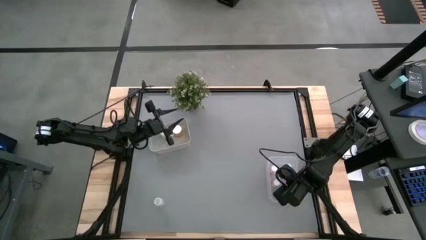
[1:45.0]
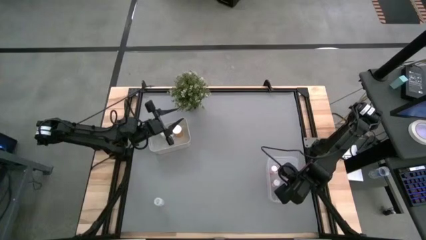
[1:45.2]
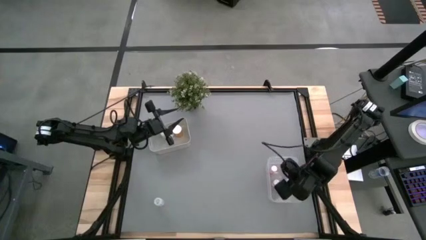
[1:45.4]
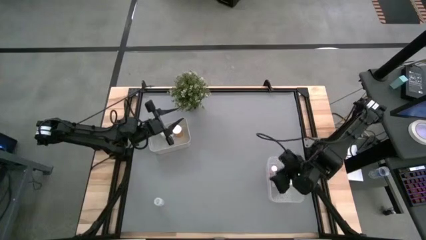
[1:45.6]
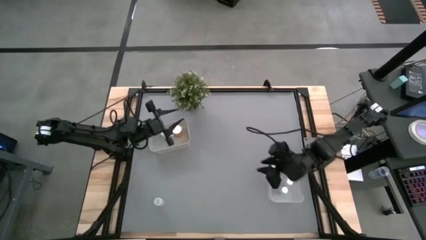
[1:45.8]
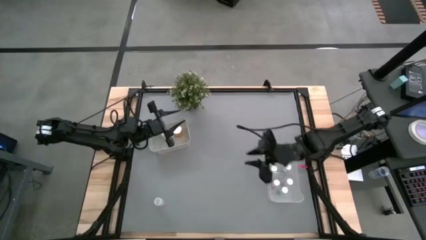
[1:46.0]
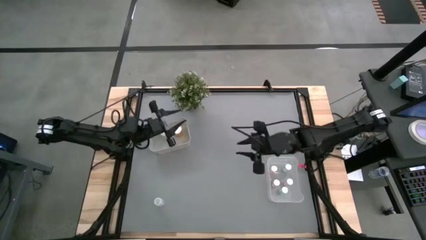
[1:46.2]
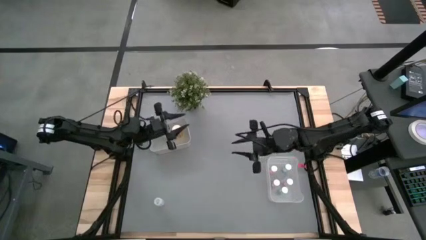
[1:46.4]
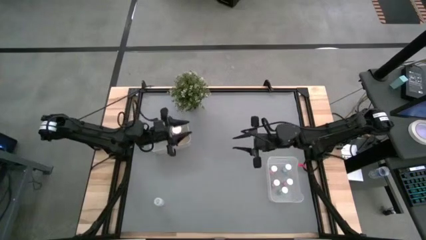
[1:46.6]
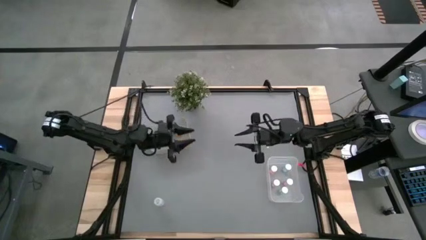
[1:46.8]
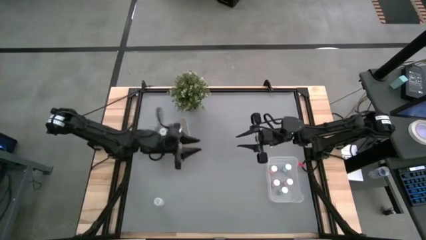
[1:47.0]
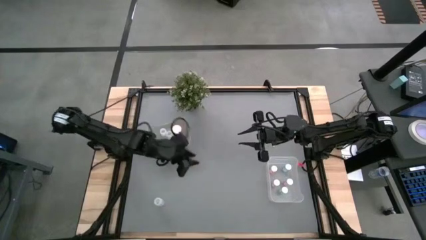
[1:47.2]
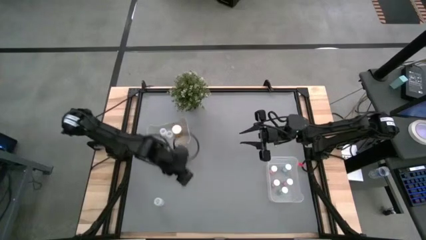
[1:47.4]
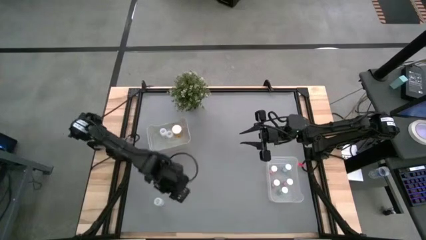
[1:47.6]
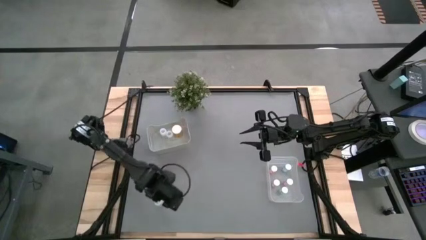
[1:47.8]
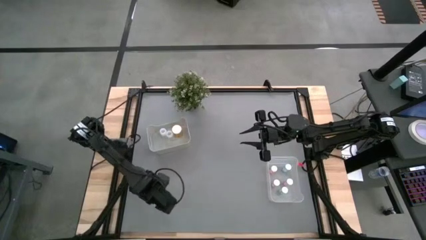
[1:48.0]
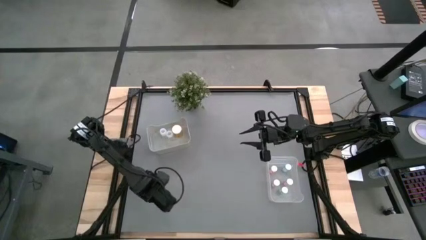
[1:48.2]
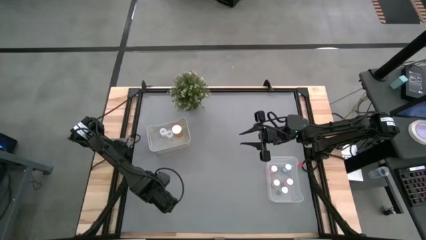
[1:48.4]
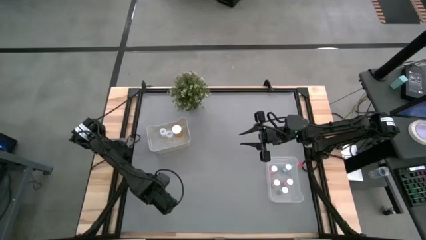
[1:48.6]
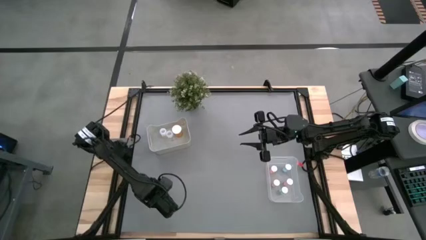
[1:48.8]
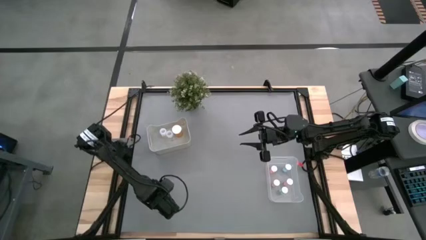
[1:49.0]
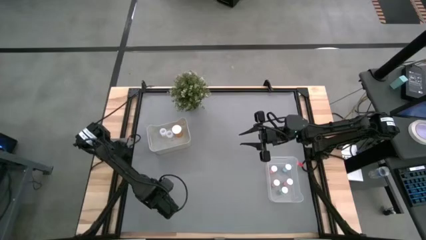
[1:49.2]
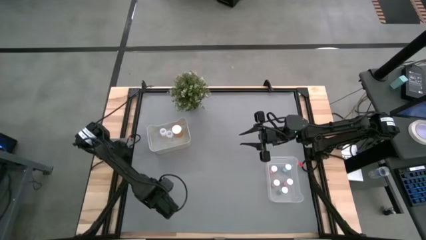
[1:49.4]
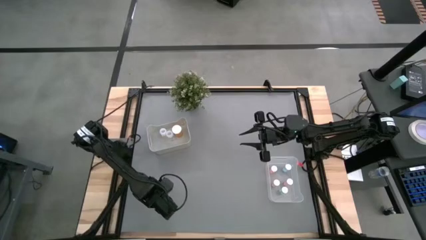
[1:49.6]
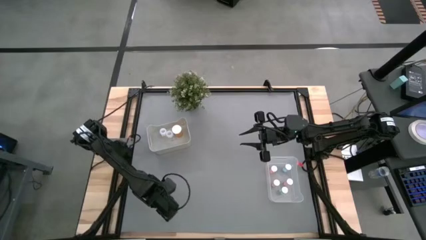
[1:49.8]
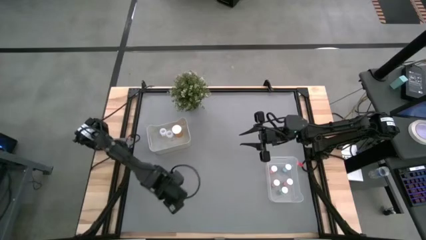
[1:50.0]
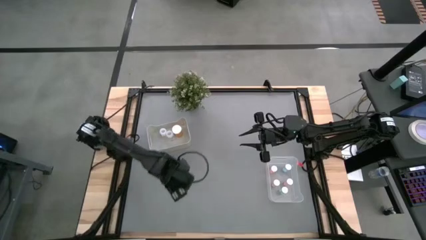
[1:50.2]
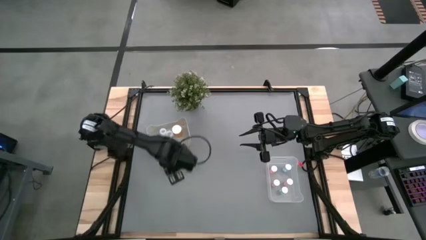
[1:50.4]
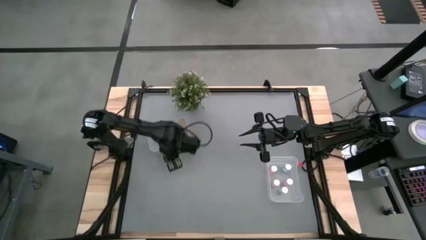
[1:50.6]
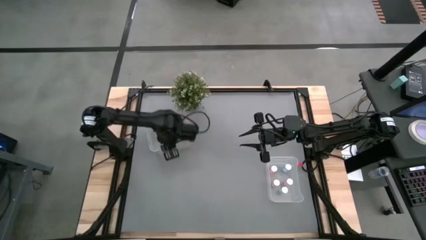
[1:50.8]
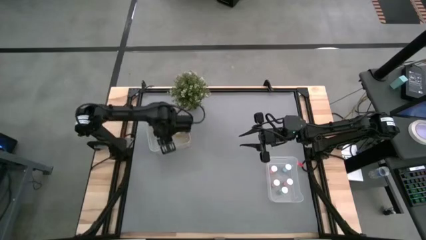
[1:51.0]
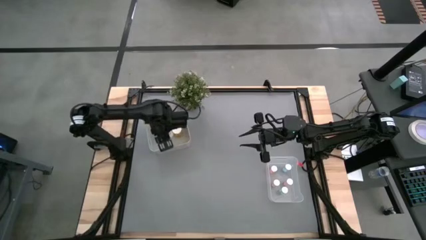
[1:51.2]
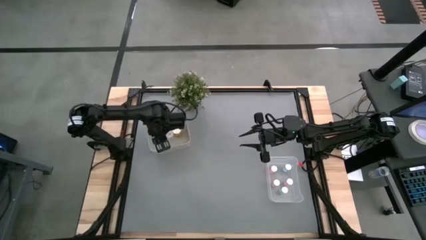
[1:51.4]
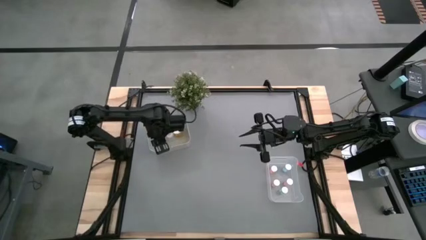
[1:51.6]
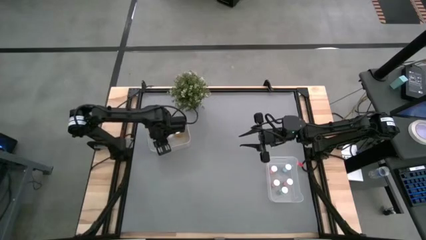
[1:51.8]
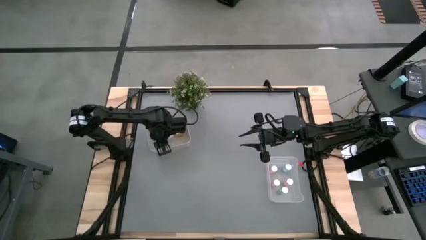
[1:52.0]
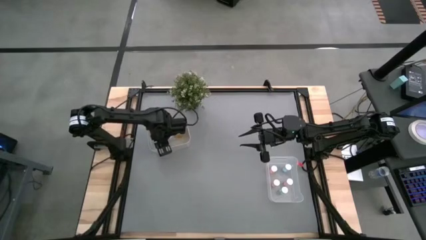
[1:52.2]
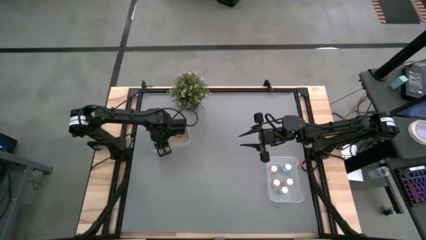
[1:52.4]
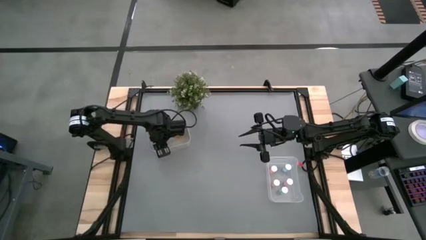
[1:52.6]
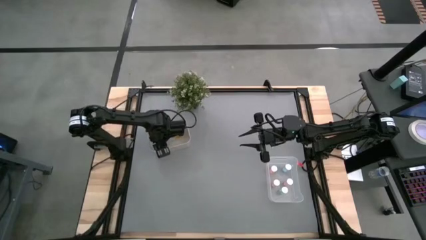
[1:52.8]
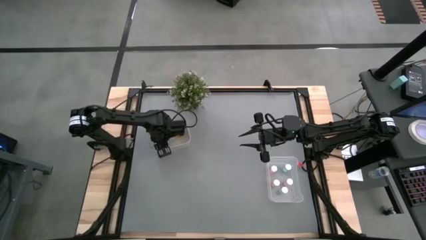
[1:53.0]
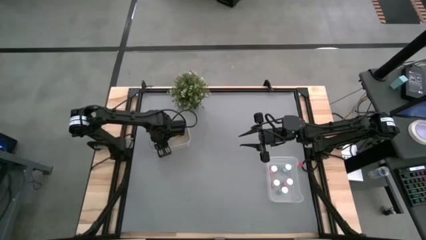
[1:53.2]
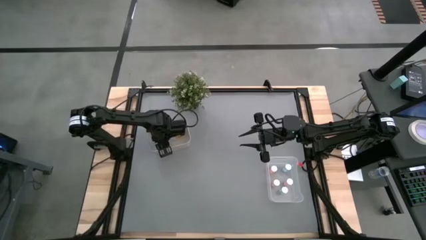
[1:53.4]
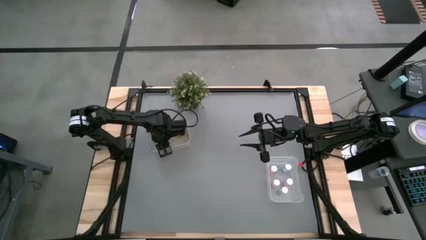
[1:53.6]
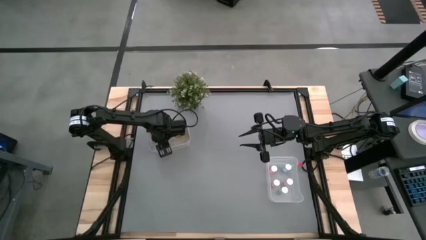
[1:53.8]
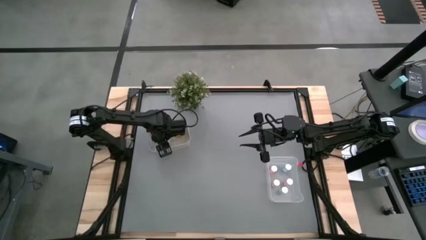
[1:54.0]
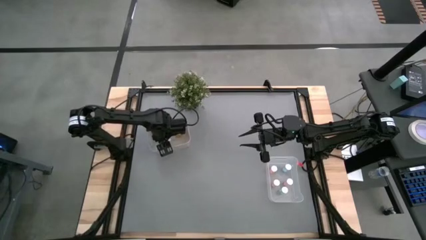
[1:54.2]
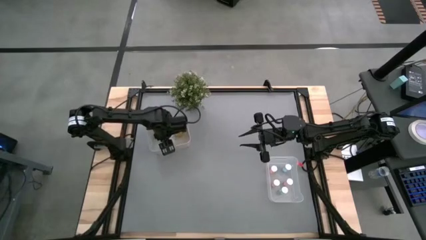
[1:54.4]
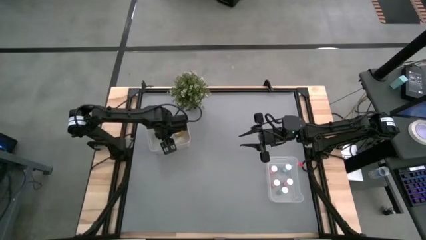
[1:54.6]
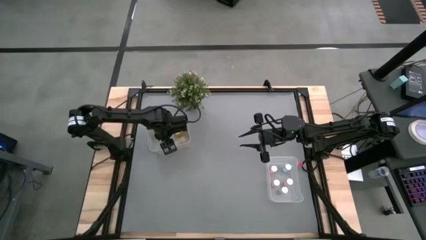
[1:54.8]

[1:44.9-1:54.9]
Task: Pick and place medicine bottles into bin by pill shape (circle, oval)
Put the transparent pill bottle into the gray bin

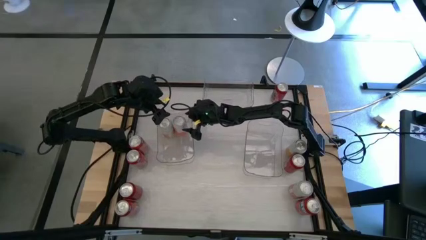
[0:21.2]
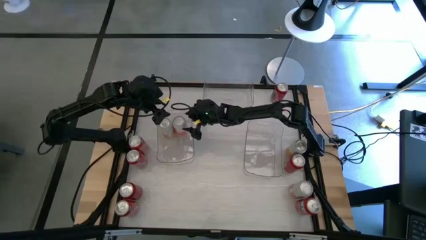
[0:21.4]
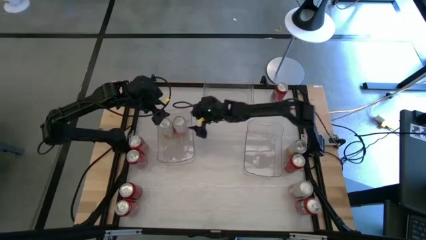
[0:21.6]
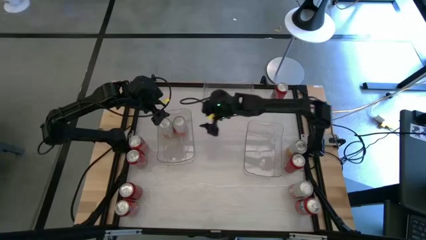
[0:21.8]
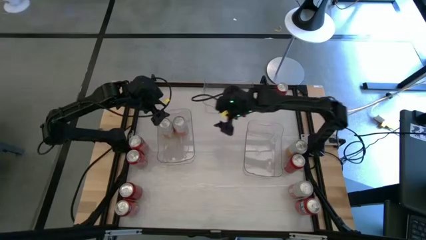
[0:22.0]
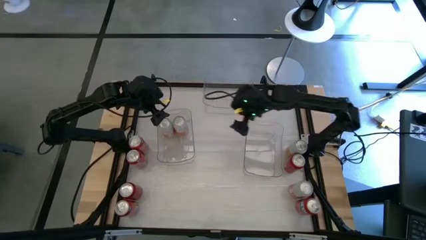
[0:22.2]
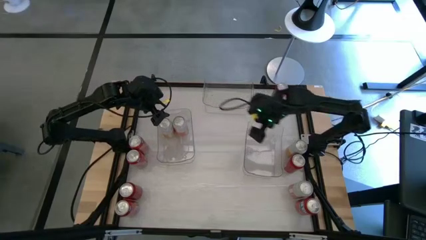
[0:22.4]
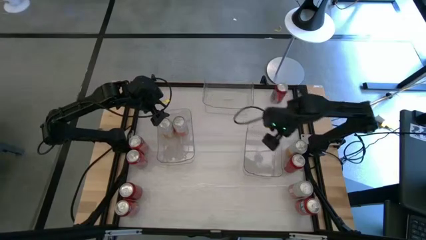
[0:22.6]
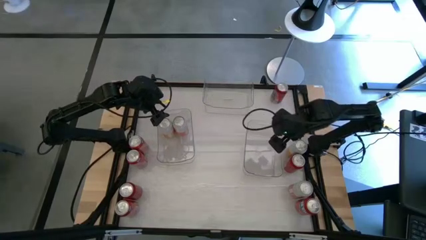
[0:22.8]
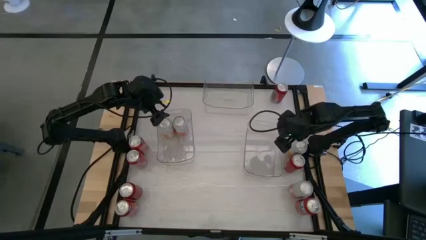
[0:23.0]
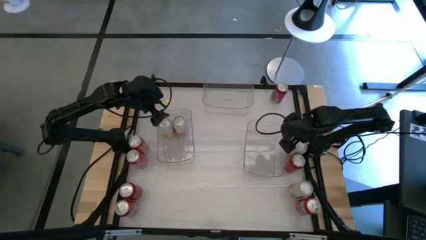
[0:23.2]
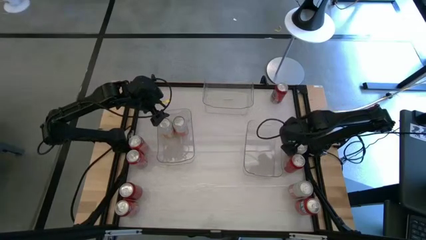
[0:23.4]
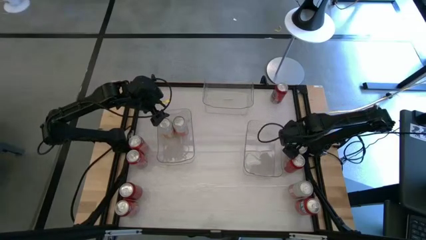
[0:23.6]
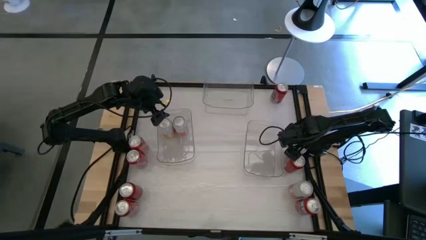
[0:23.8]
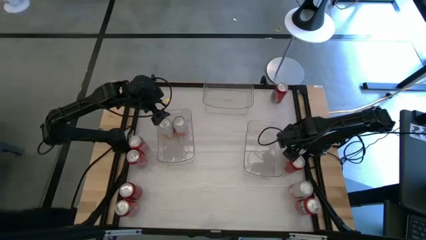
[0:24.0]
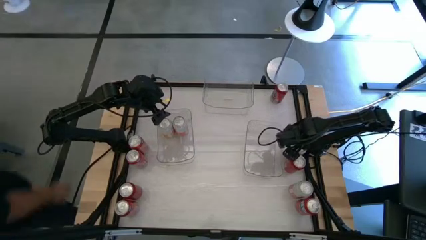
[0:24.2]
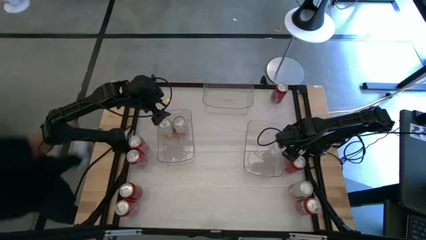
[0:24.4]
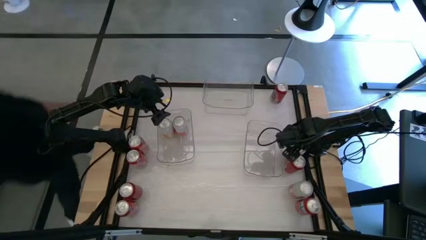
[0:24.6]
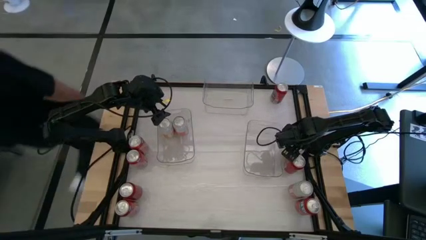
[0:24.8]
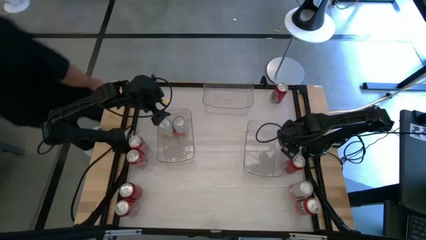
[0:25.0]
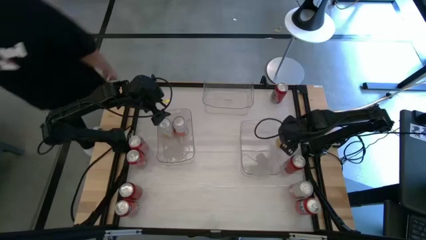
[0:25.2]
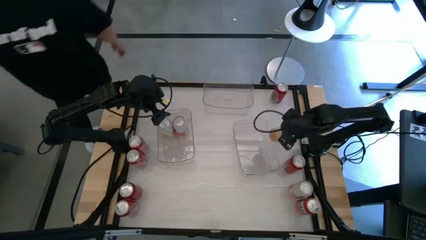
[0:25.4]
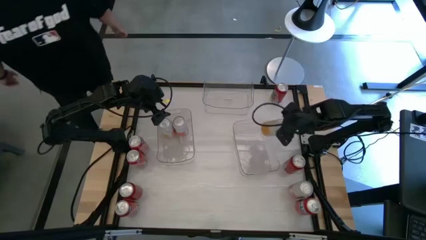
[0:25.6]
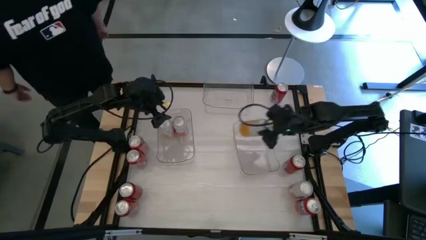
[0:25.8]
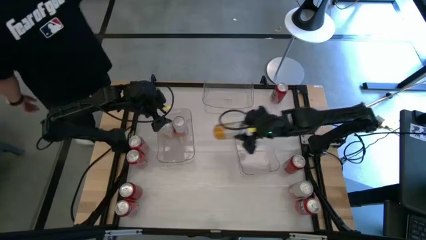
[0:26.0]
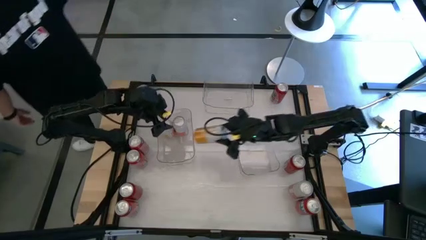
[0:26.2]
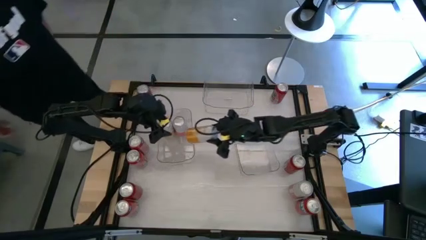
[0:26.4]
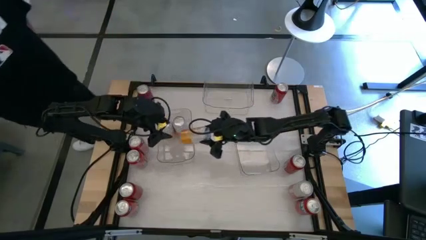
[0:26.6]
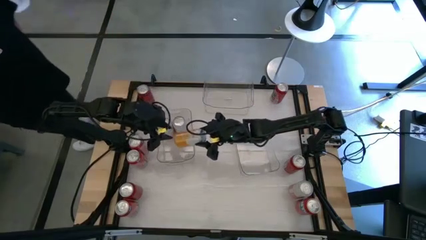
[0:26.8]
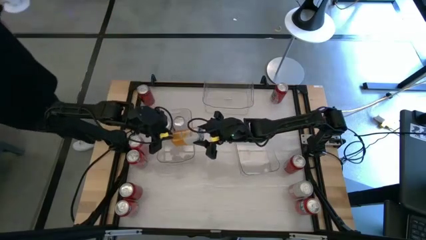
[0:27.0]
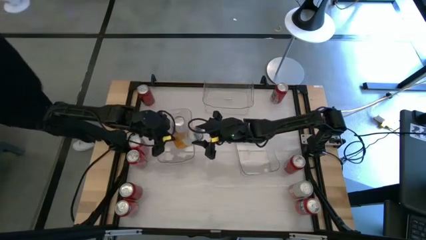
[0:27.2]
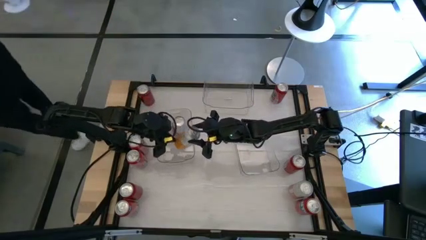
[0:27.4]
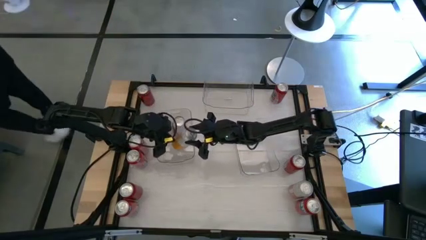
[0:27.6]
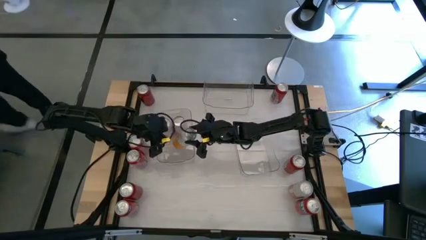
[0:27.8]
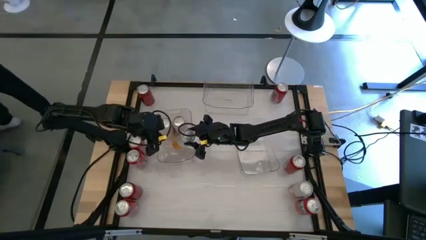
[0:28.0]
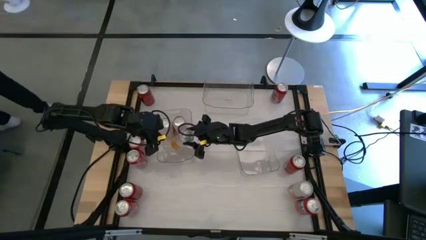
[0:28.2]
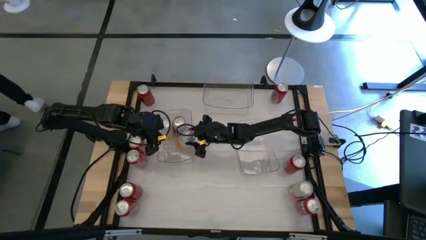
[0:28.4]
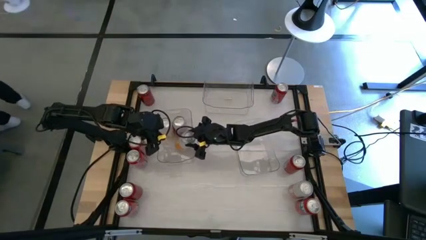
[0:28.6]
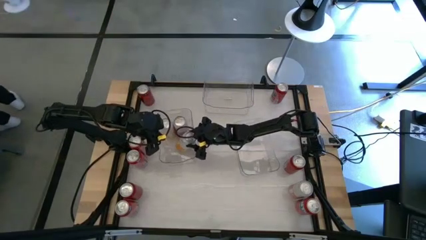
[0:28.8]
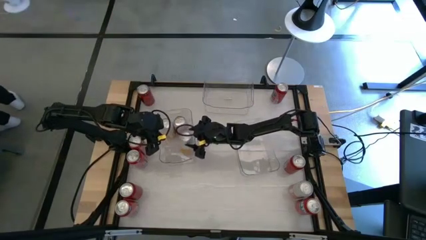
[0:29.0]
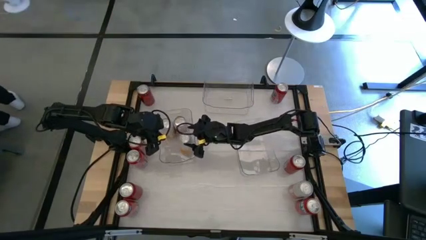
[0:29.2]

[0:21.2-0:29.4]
Task: Sort soda cans
Put the yellow white soda can into the left transparent bin
